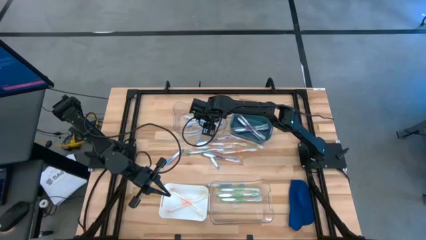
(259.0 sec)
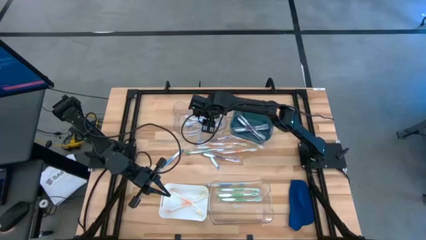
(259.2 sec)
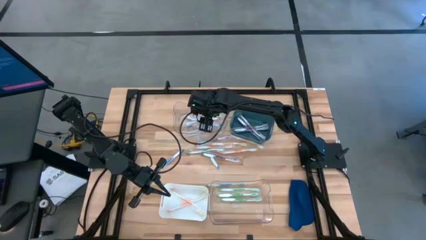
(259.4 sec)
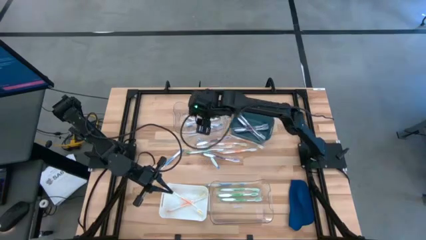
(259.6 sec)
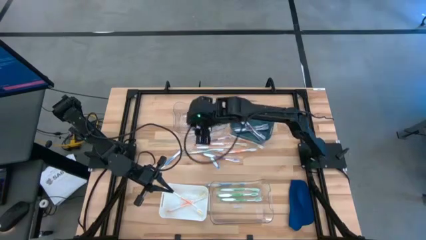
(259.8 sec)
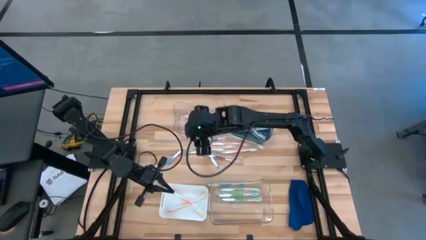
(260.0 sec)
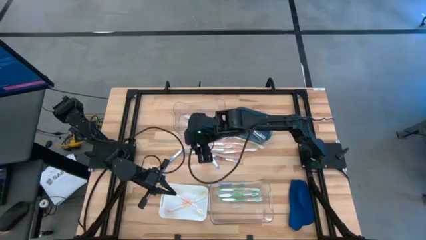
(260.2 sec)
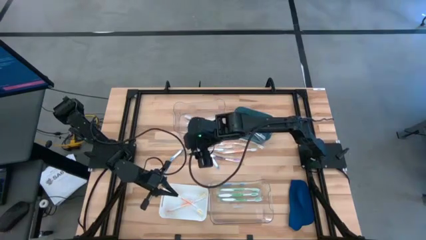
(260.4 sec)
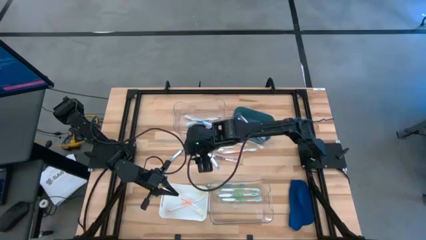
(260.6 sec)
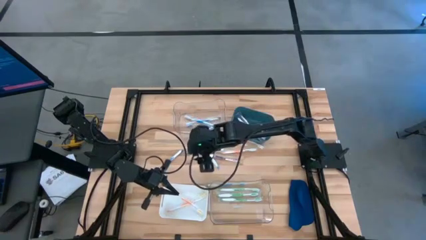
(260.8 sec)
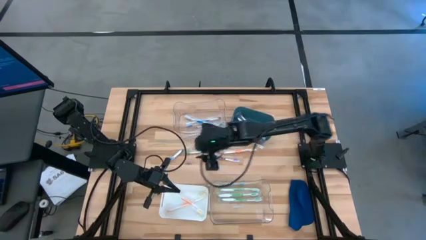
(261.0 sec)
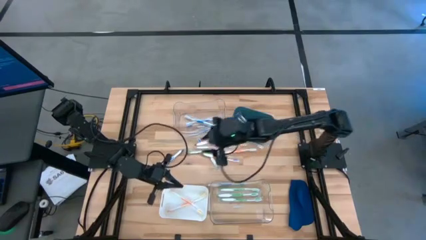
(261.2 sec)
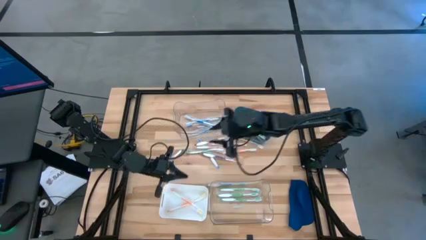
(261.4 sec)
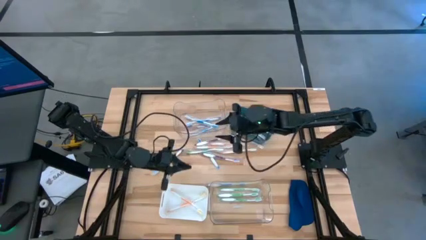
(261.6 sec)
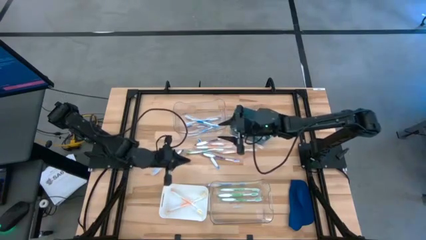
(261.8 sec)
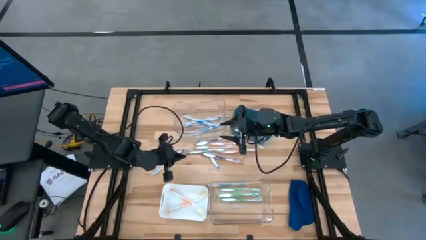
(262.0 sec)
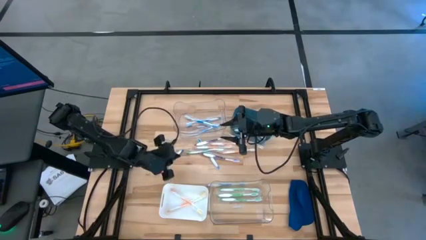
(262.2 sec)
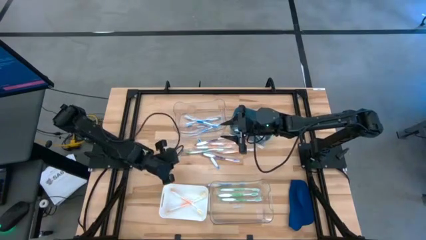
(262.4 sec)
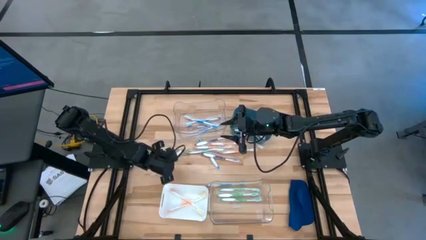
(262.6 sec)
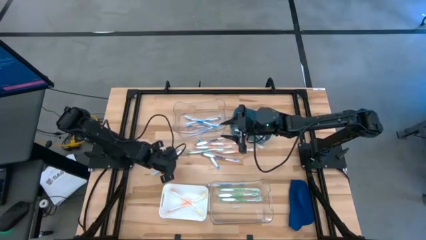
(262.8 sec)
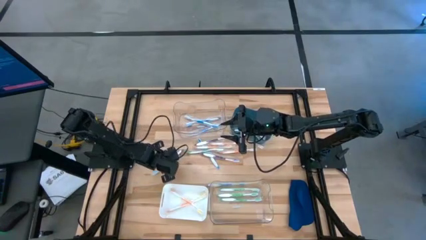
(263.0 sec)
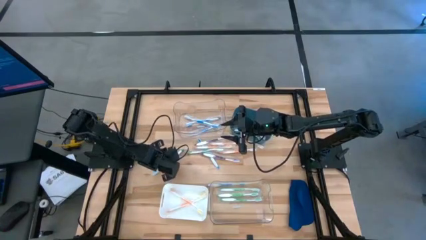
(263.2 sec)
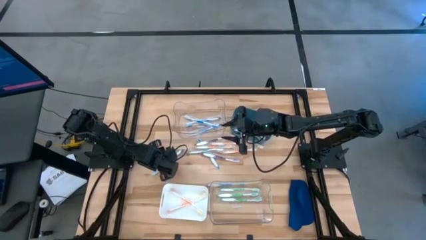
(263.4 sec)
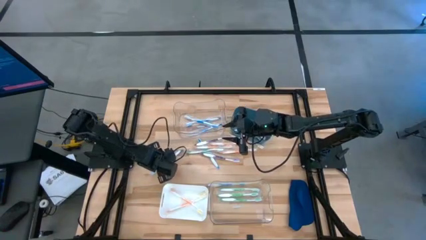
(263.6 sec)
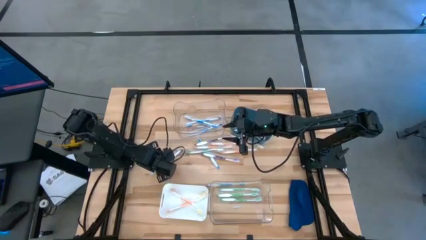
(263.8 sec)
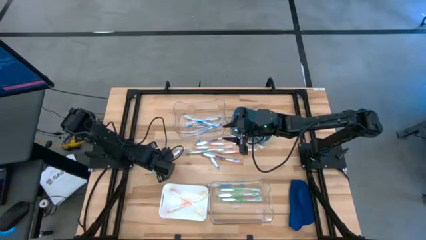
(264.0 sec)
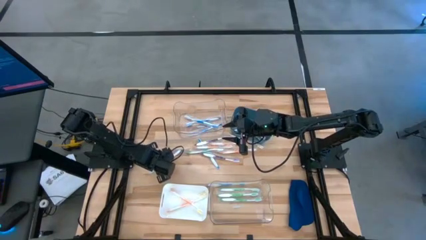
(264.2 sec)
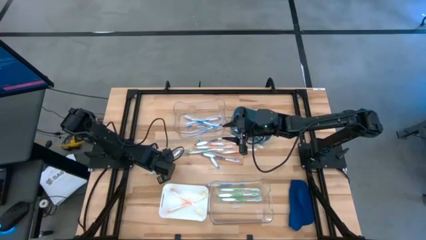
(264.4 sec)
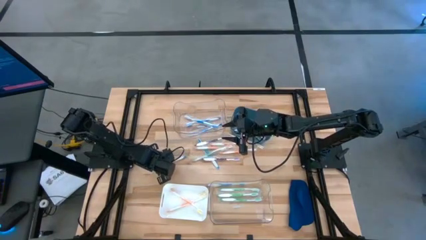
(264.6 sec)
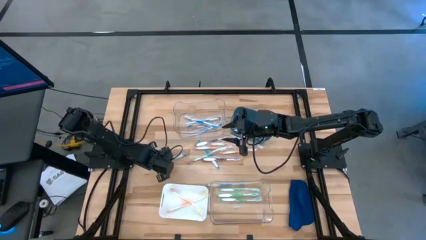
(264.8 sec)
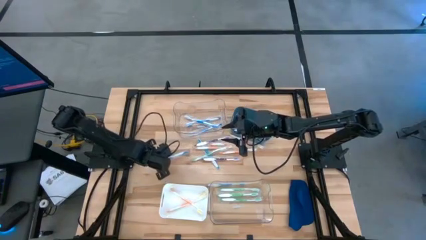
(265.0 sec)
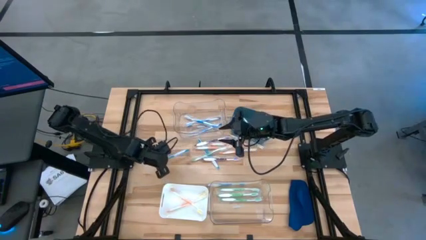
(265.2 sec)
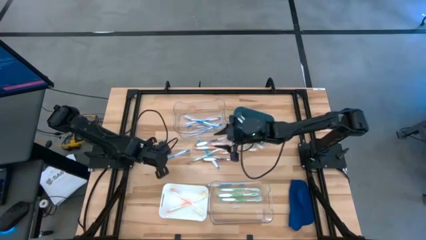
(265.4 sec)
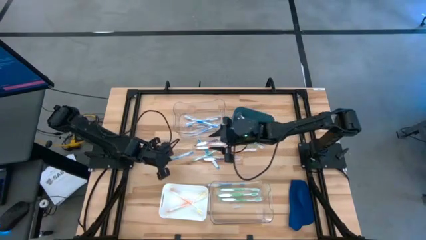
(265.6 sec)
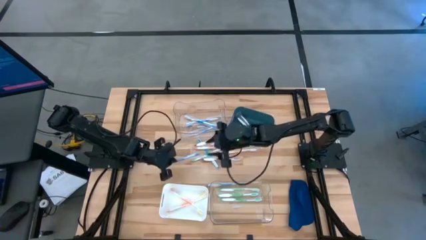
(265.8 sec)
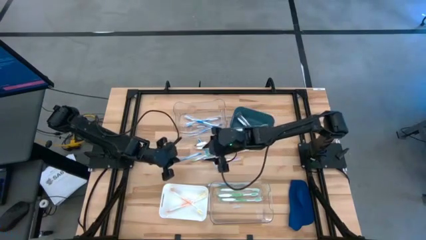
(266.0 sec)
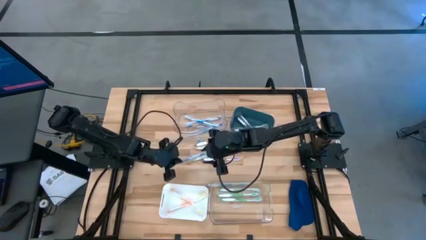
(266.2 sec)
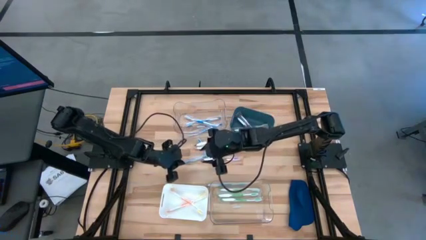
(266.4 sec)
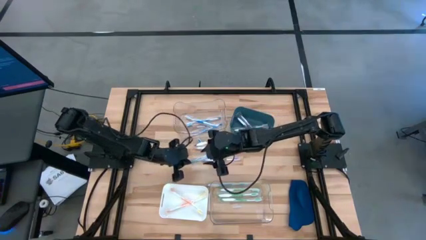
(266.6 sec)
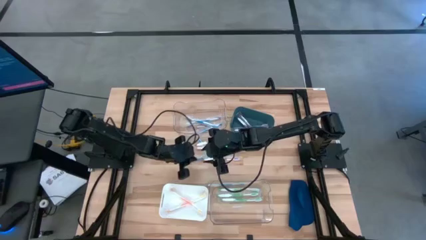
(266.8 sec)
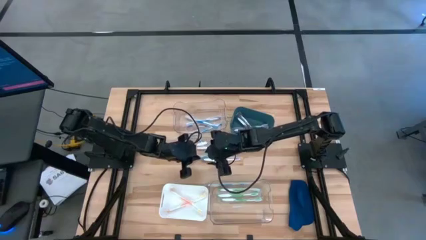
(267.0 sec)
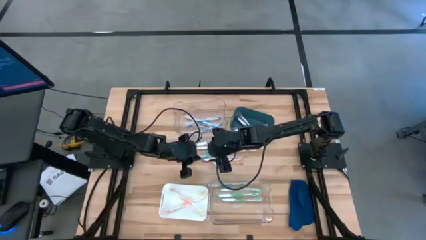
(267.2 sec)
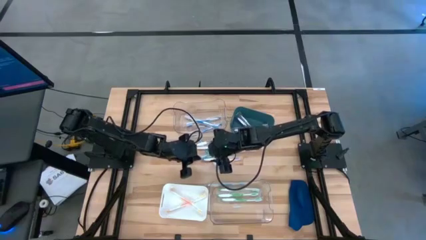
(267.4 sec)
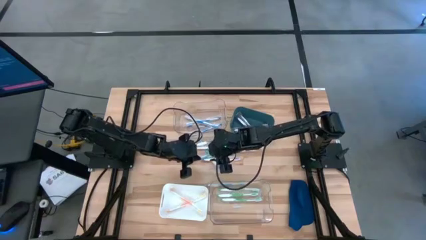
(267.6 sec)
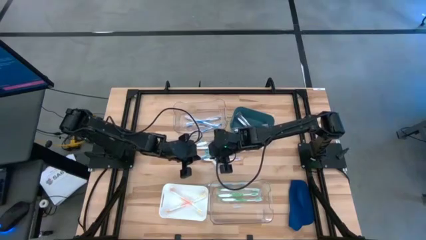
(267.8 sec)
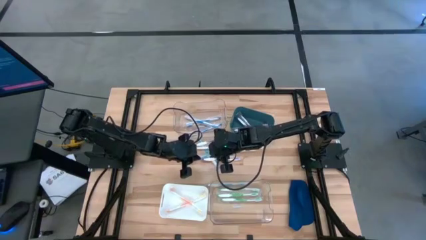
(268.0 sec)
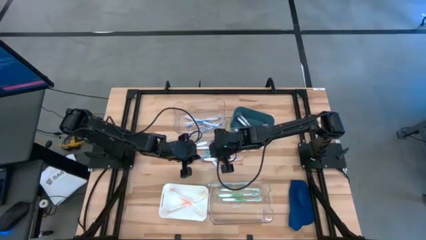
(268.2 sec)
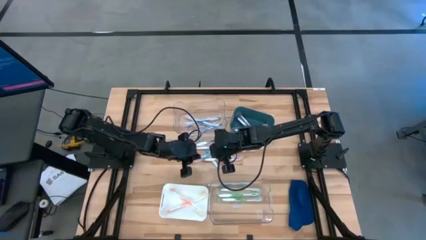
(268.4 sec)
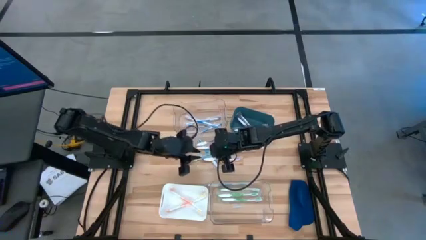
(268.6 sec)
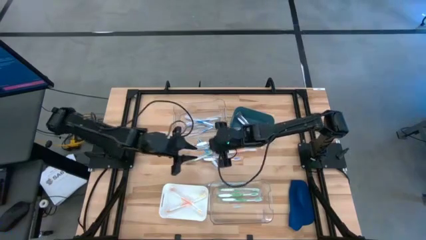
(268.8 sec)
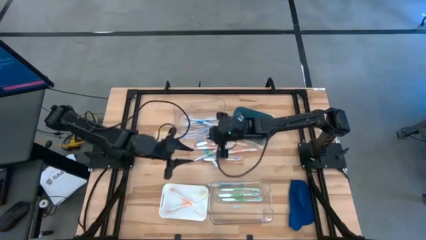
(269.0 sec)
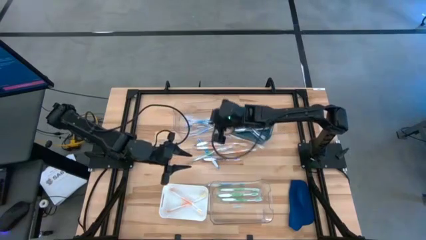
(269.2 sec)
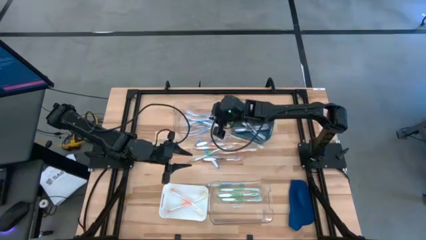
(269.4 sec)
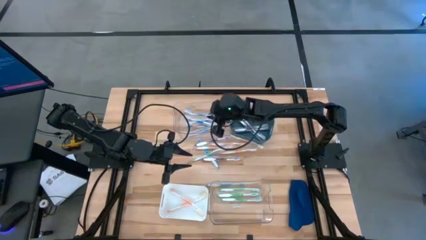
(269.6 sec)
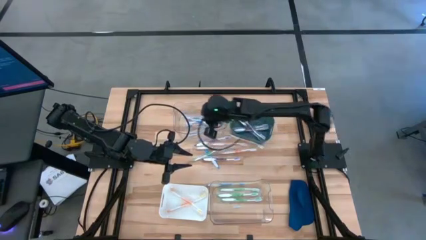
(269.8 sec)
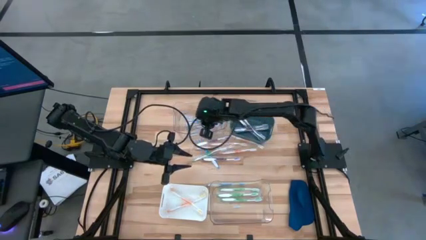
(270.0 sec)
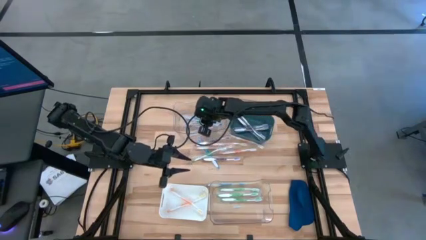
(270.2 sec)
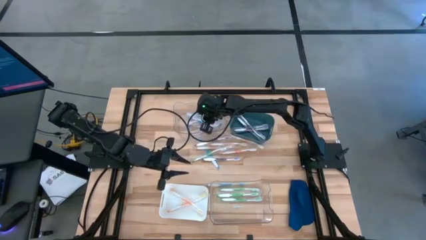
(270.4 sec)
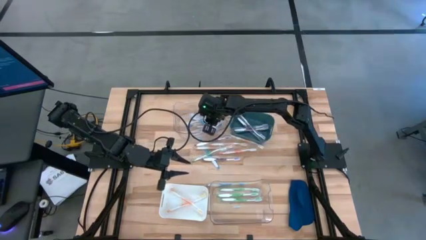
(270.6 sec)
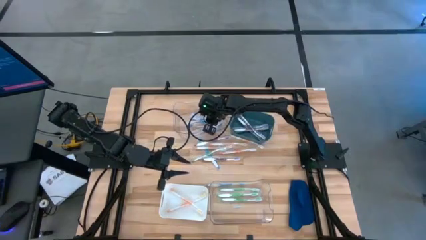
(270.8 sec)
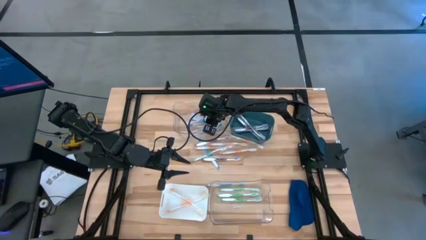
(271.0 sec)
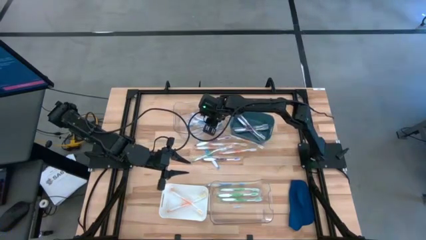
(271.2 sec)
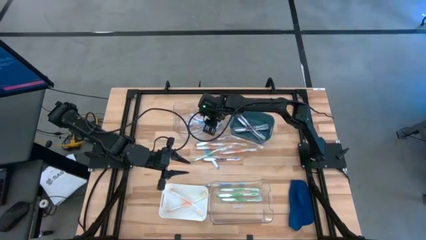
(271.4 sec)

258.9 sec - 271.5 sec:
Task: Pick & Place Toothbrushes
Put the blue toothbrush into the top transparent bin
